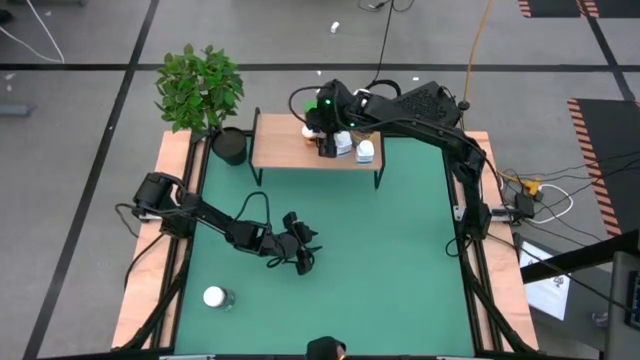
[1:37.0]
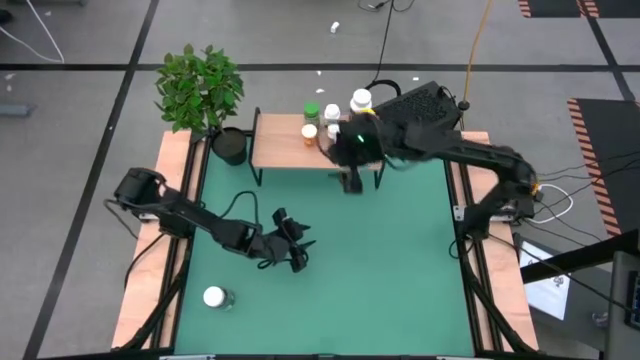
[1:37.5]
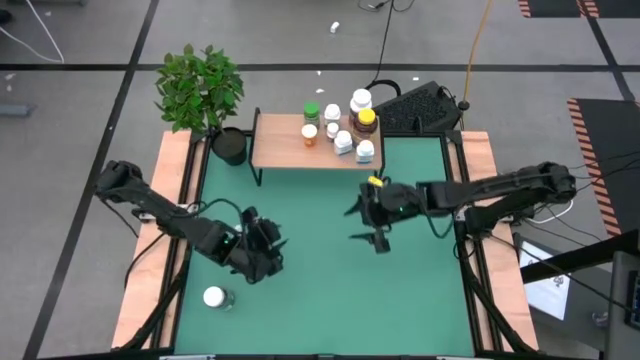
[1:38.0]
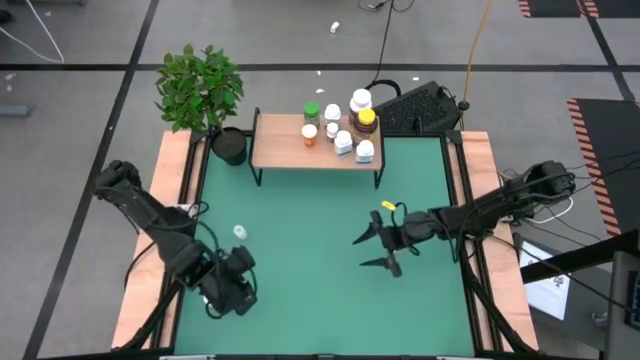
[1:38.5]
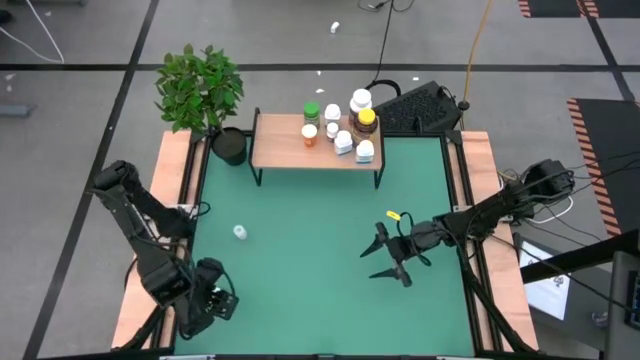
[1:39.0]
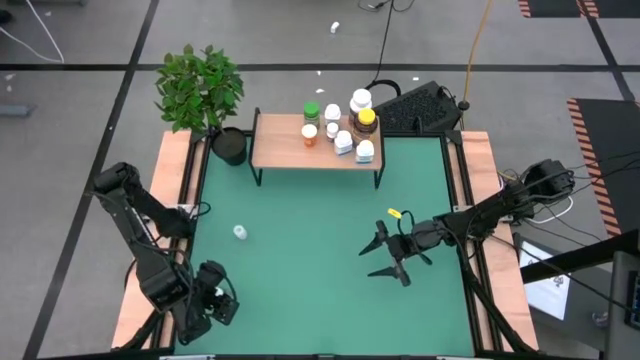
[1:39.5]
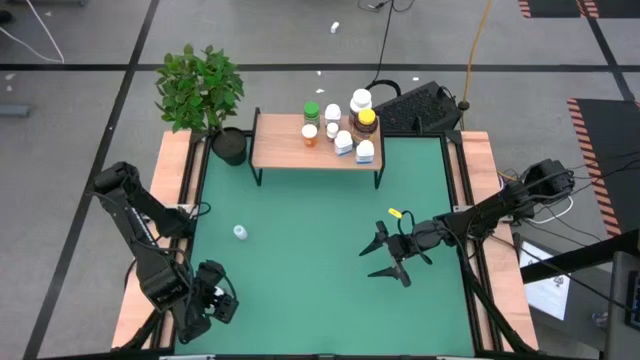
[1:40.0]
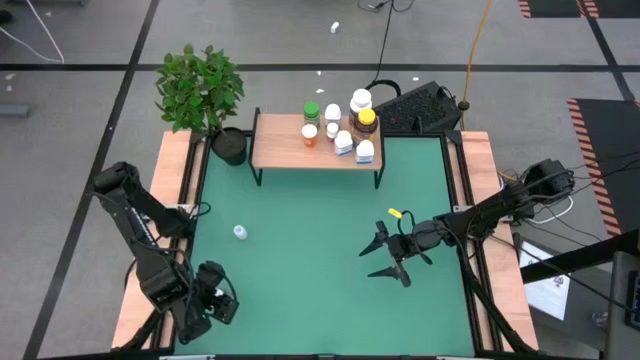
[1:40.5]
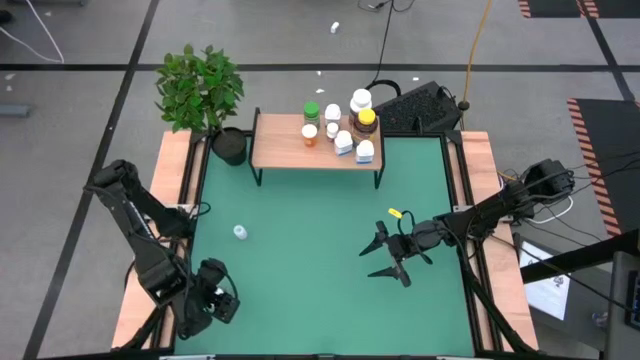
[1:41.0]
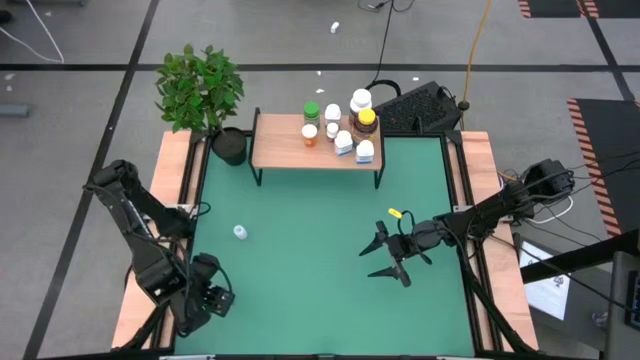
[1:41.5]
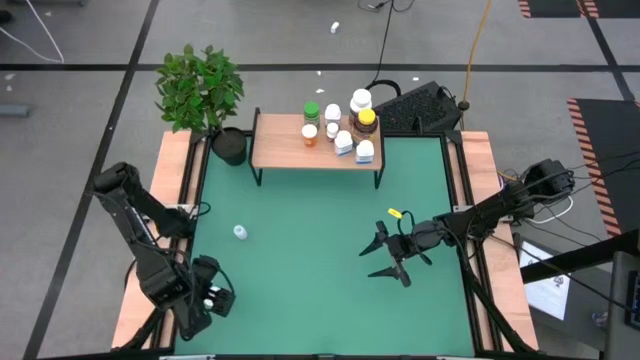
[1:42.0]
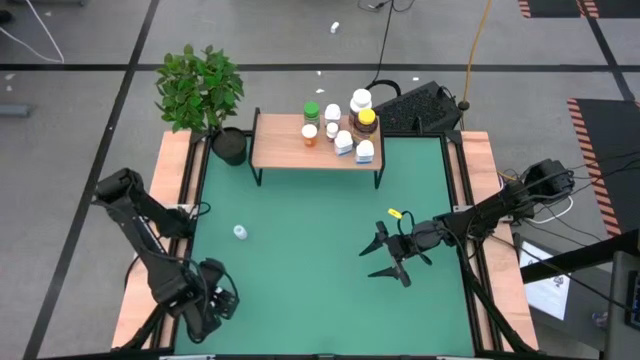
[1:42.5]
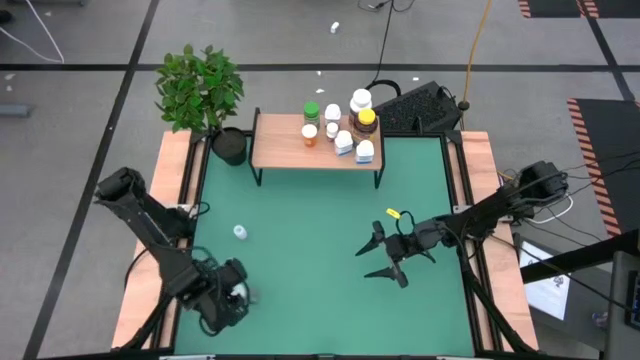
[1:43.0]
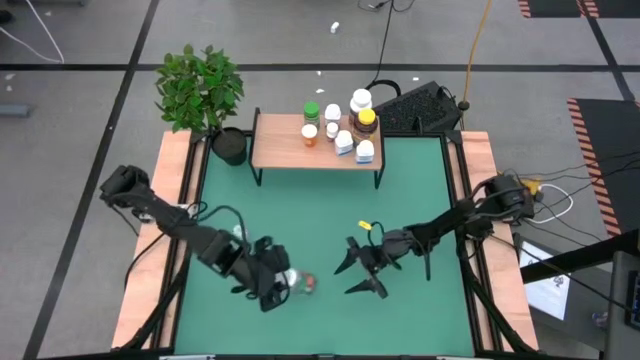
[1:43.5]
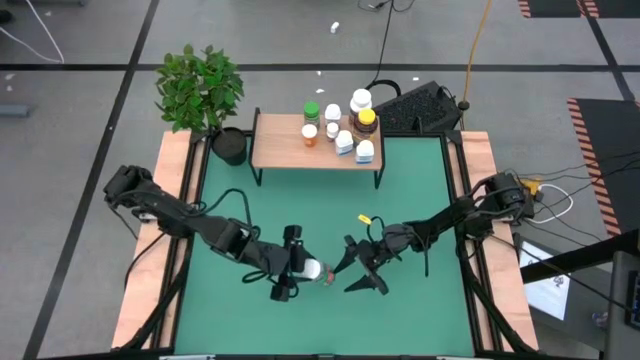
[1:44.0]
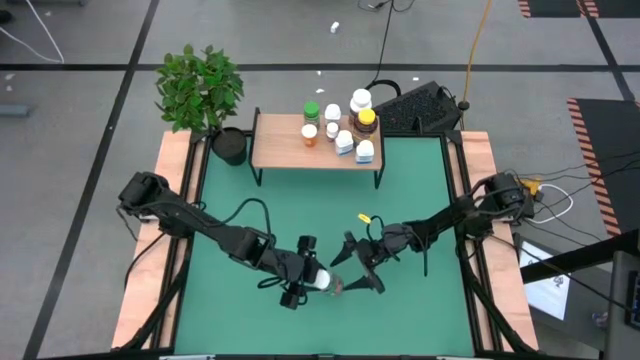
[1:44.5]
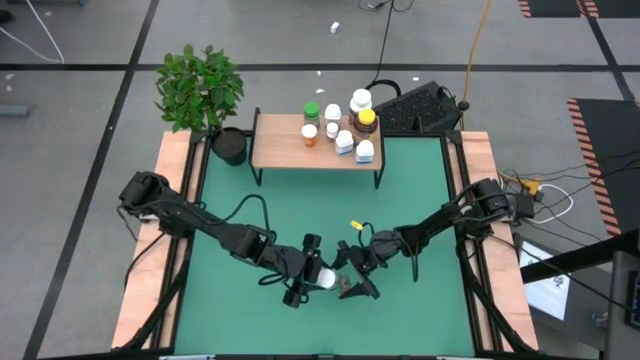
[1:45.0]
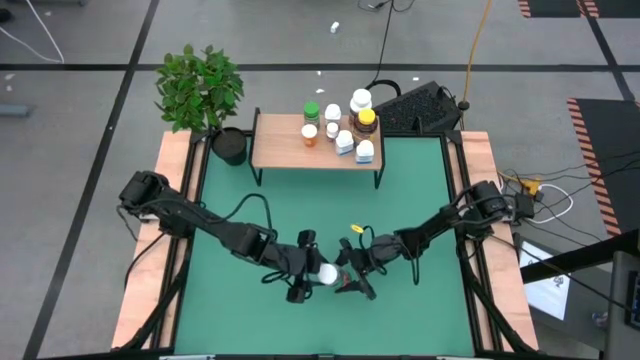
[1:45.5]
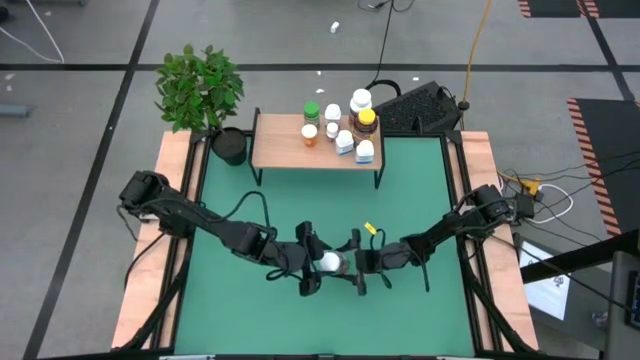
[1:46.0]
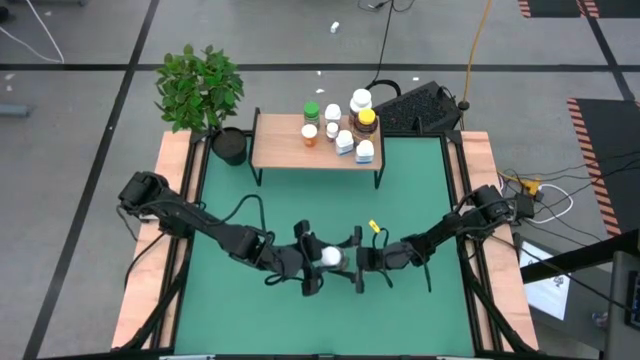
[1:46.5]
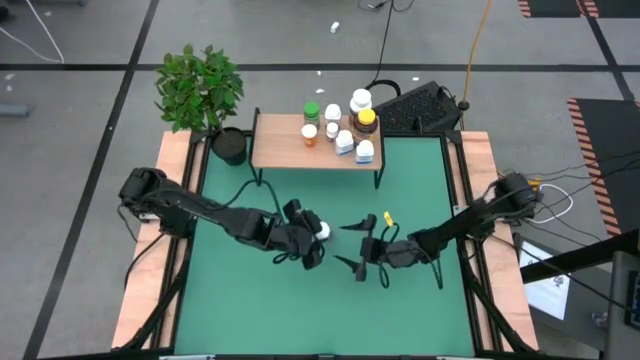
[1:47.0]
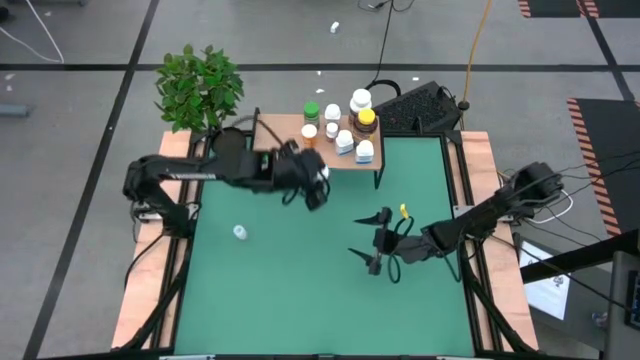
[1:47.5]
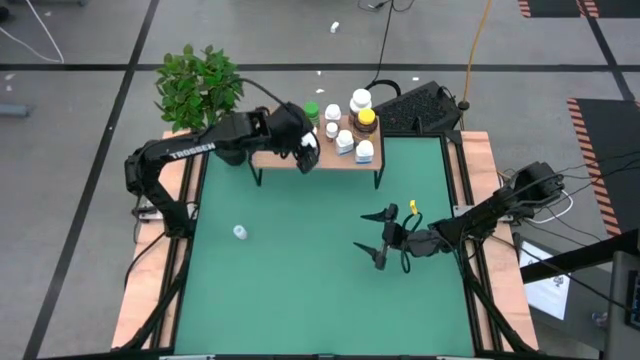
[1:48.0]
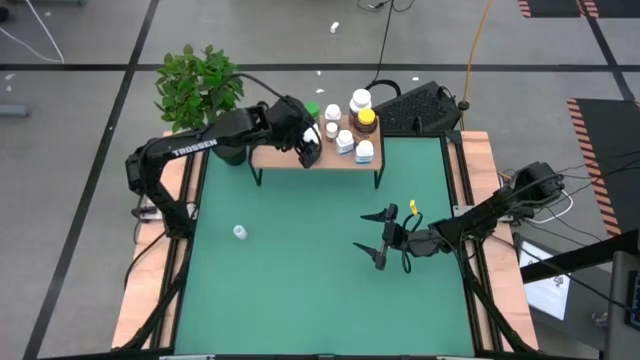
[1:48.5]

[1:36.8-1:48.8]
Task: Pick and place medicine bottles onto shelf by color
Put the green pill bottle on the shelf

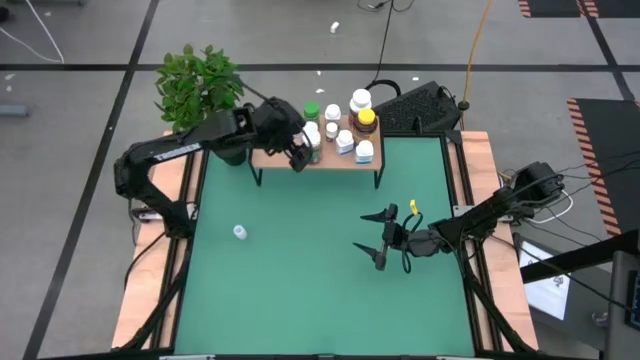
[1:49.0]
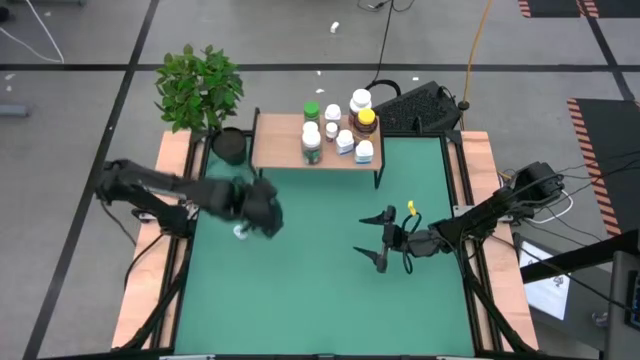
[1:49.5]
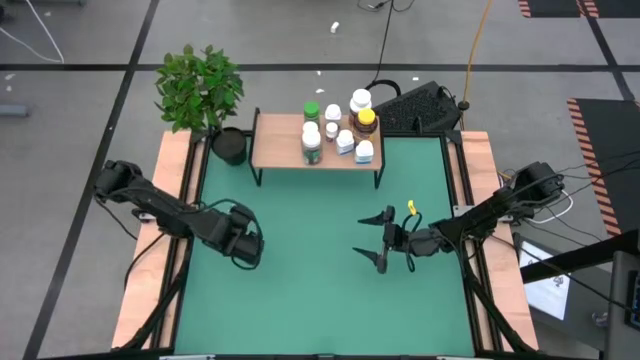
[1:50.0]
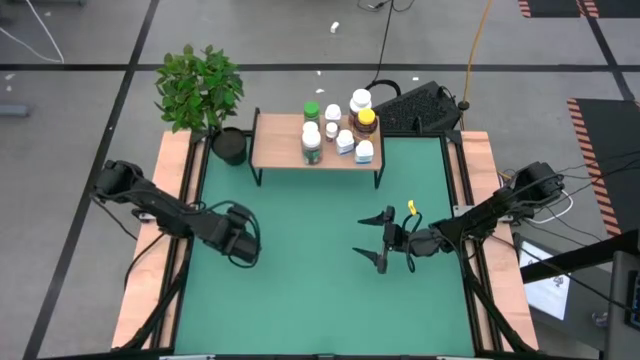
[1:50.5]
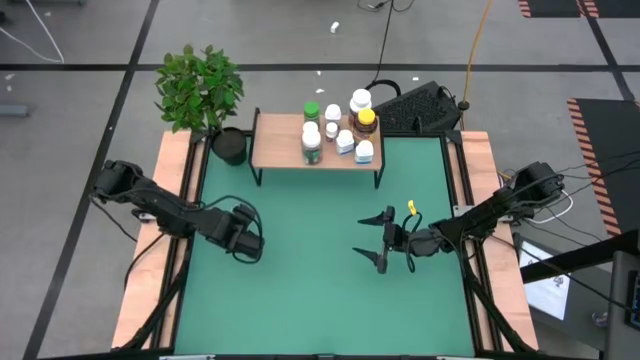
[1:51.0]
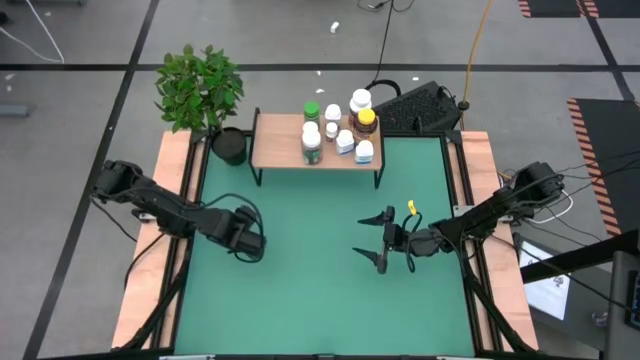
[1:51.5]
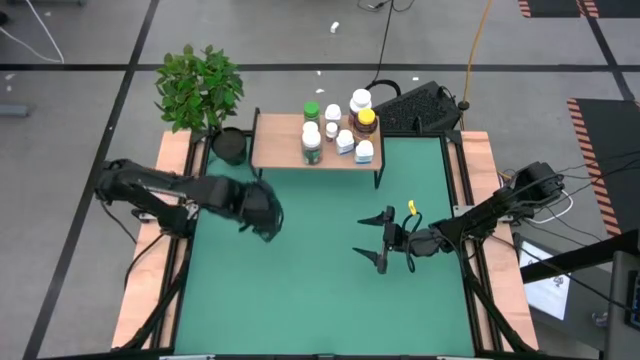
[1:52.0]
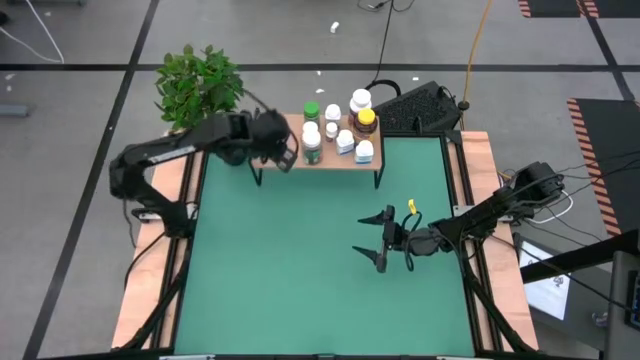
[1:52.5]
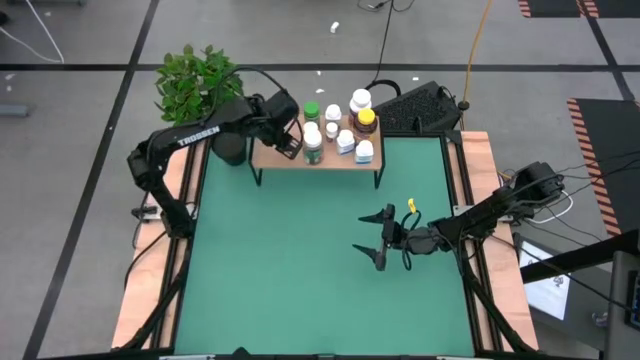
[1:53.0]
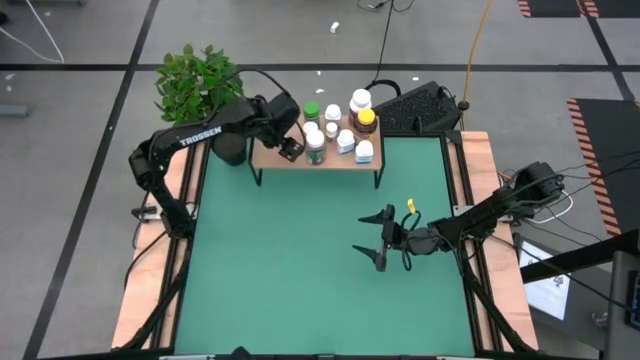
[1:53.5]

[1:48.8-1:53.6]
Put the transparent pill bottle on the shelf

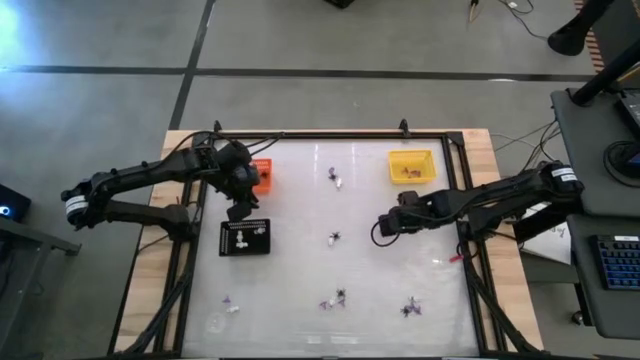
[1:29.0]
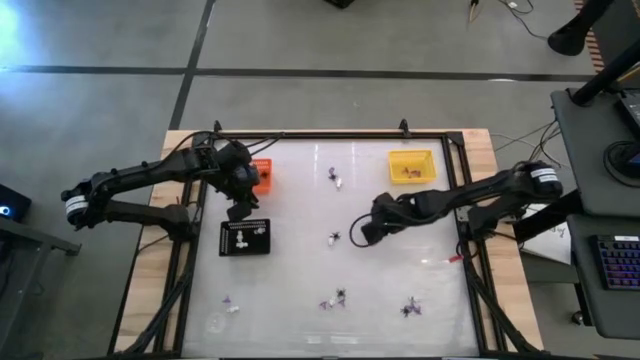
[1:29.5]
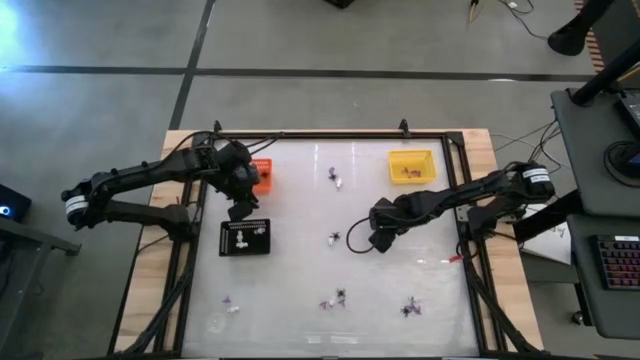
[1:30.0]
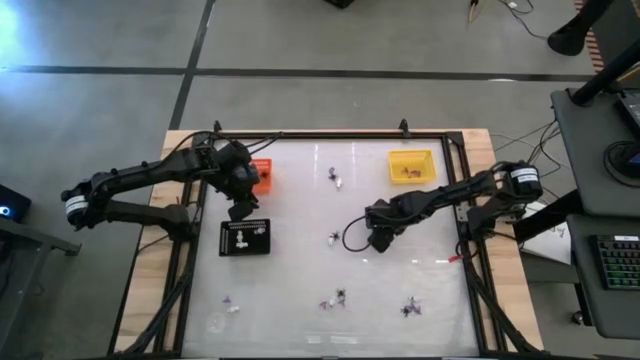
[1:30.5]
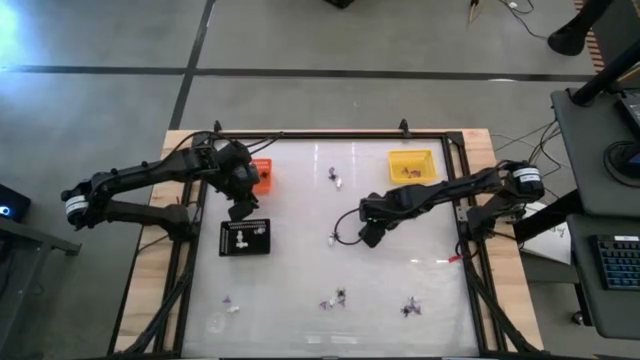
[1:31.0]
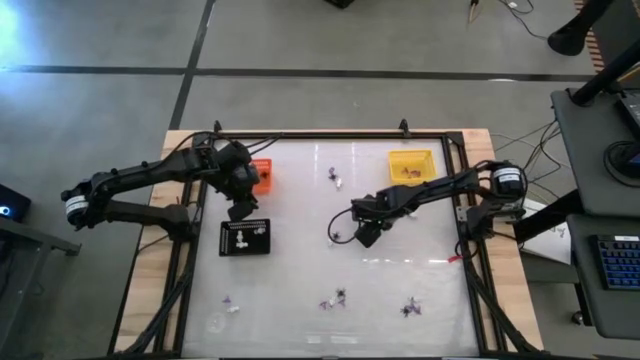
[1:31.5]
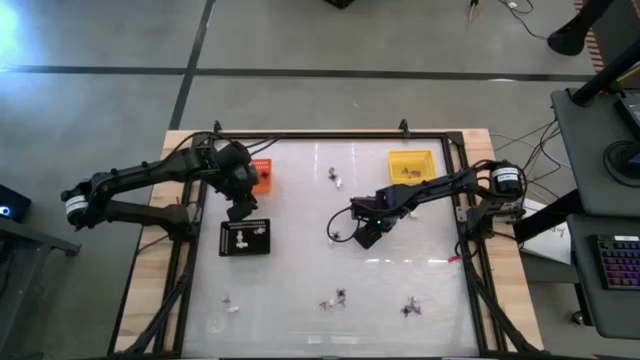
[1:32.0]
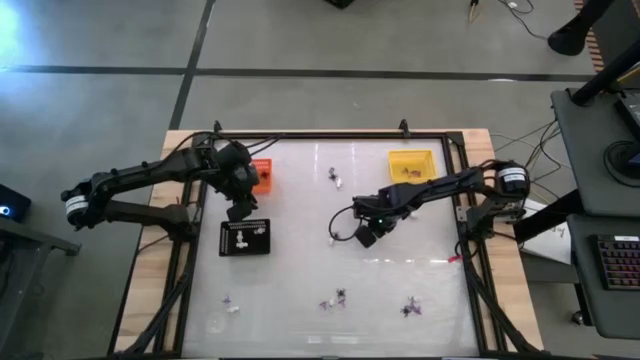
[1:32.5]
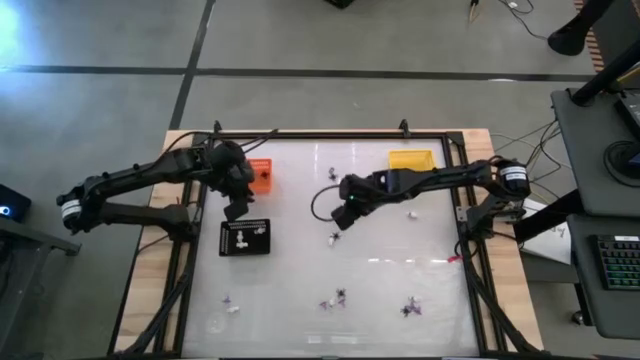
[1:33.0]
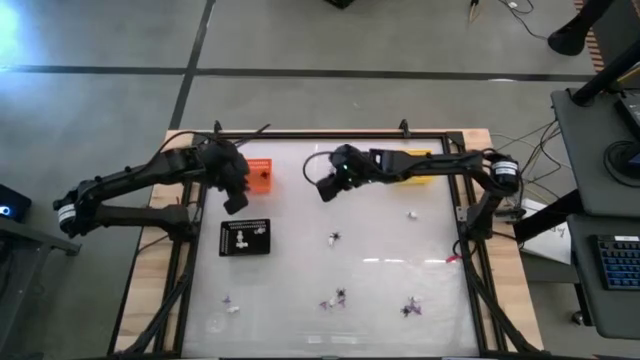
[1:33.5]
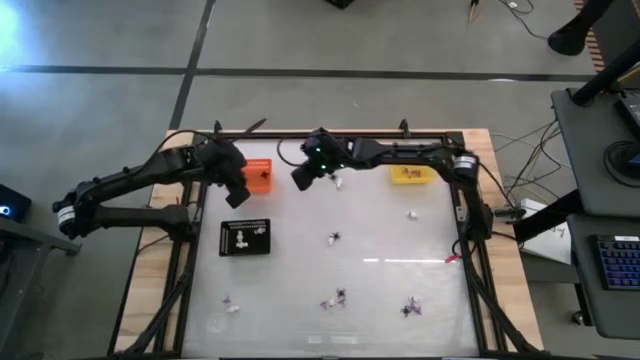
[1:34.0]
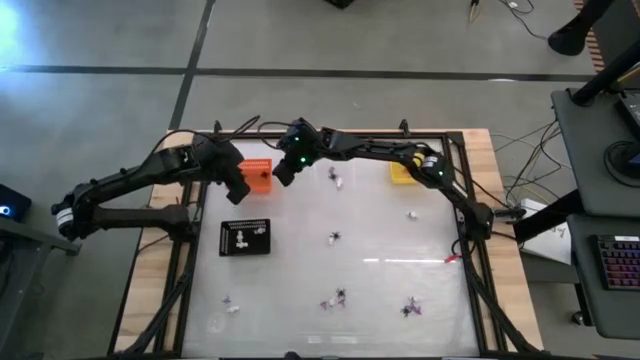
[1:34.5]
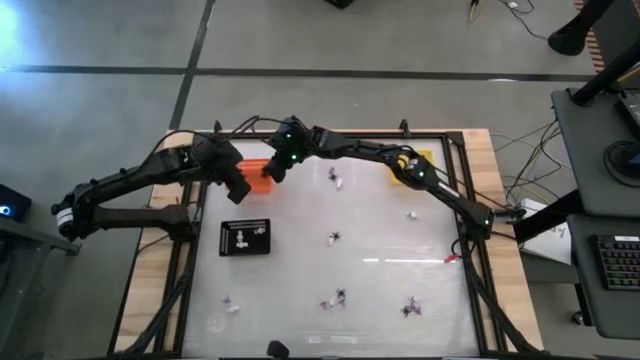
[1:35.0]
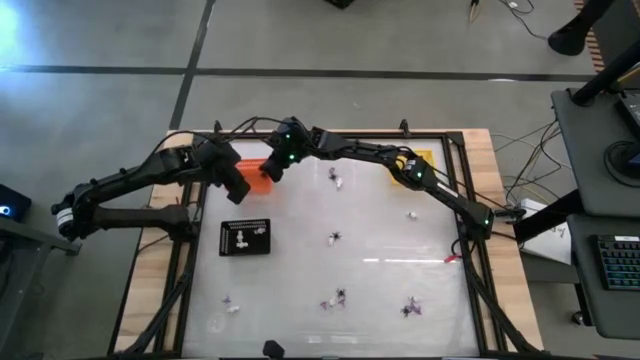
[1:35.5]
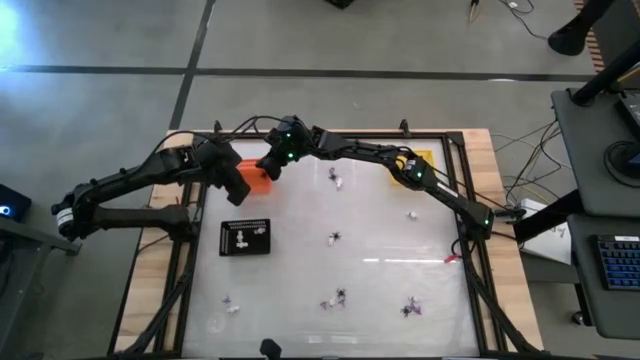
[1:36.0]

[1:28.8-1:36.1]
Task: Sort Halloween decoration
Put the black spider toy into the orange bin
